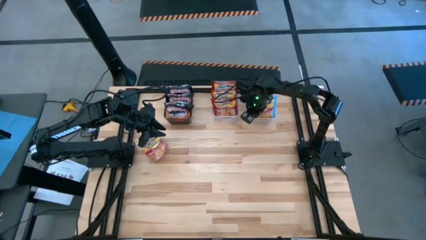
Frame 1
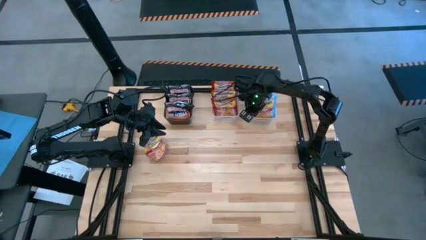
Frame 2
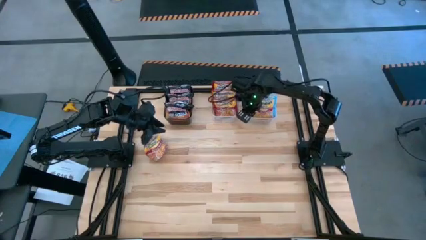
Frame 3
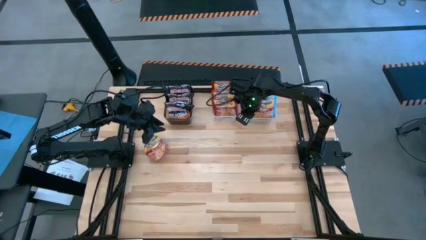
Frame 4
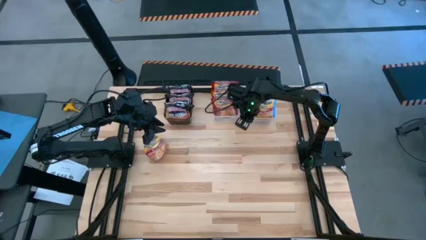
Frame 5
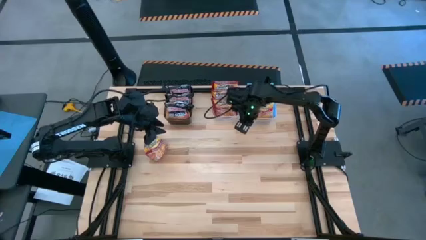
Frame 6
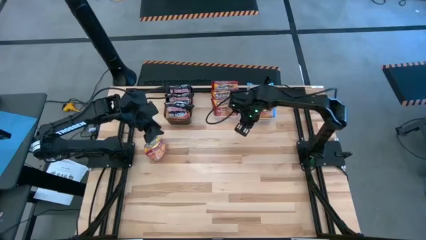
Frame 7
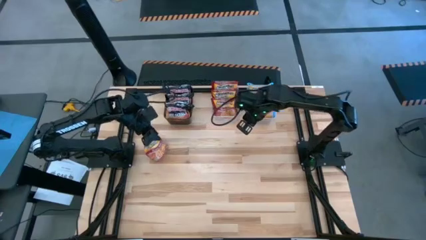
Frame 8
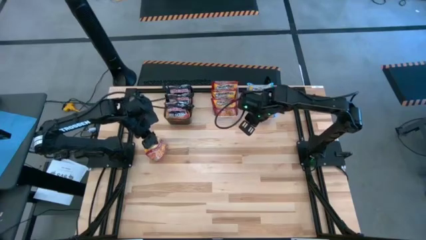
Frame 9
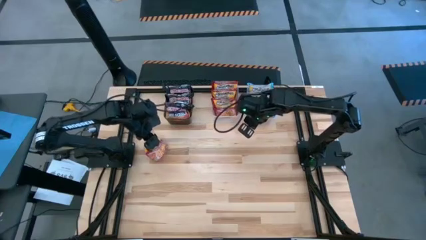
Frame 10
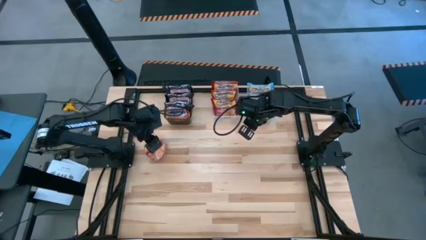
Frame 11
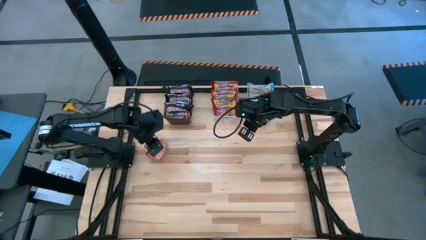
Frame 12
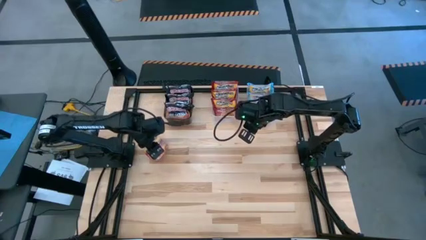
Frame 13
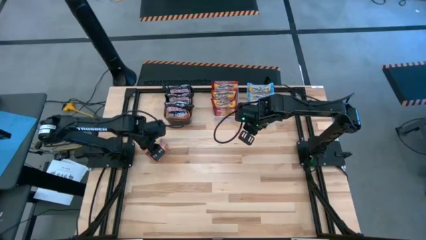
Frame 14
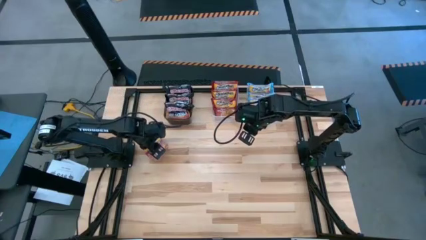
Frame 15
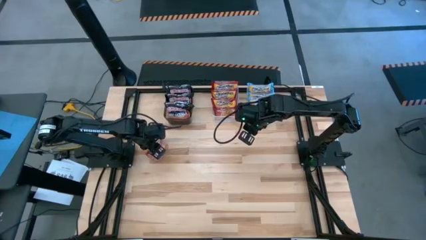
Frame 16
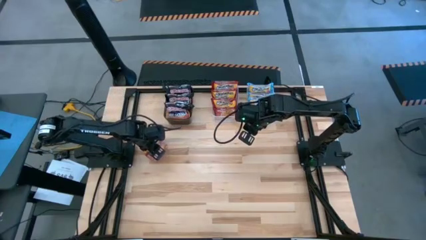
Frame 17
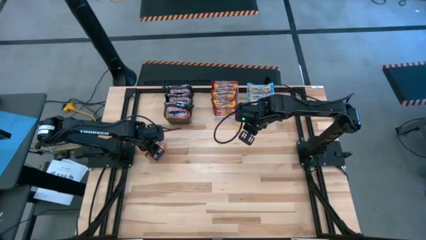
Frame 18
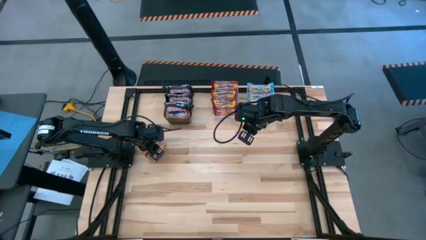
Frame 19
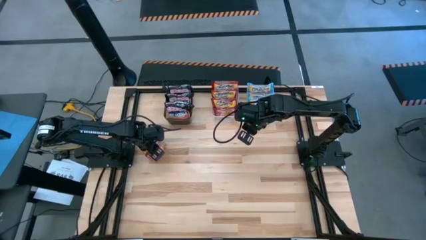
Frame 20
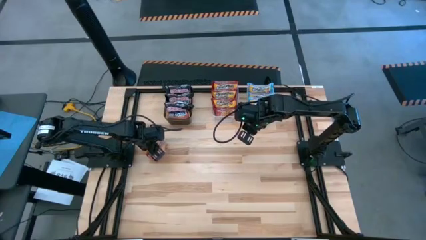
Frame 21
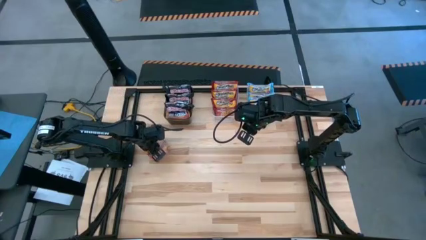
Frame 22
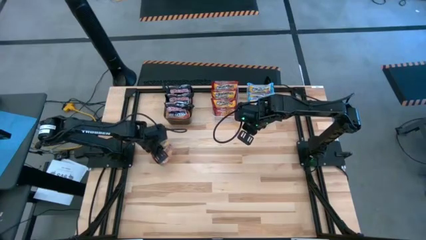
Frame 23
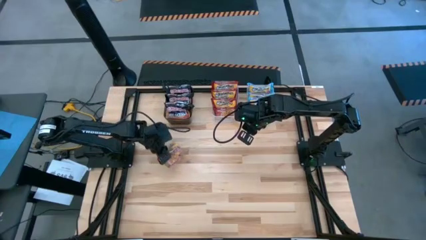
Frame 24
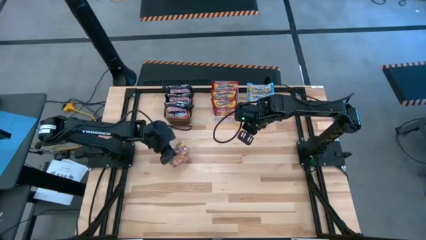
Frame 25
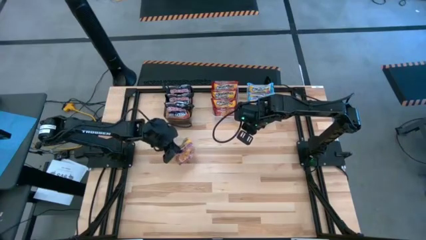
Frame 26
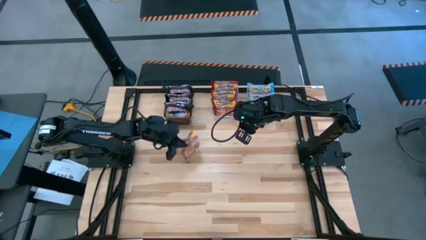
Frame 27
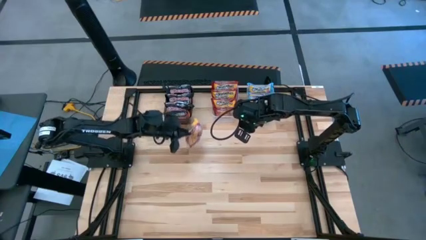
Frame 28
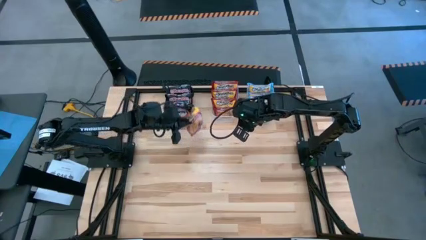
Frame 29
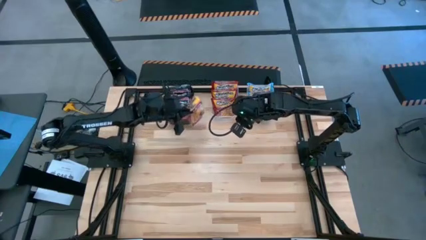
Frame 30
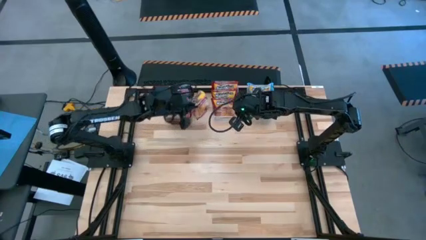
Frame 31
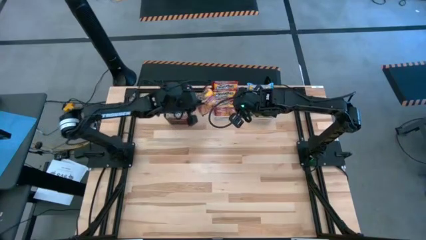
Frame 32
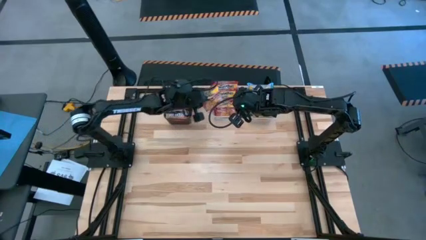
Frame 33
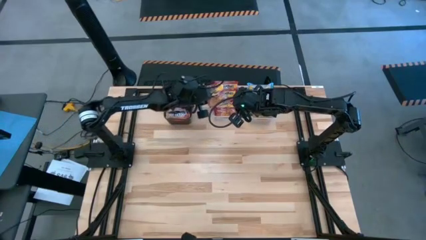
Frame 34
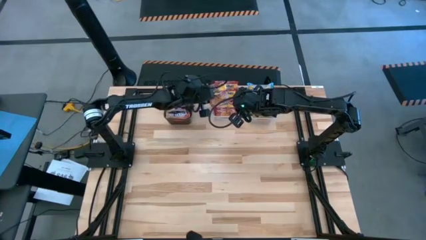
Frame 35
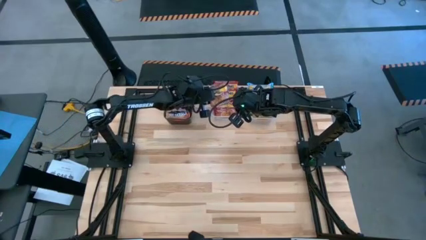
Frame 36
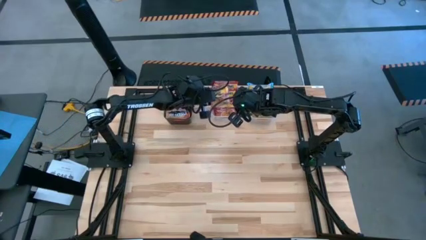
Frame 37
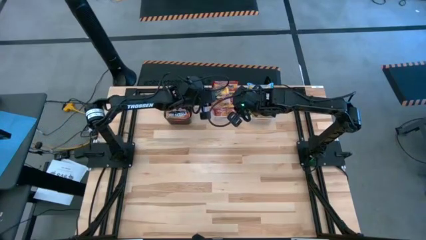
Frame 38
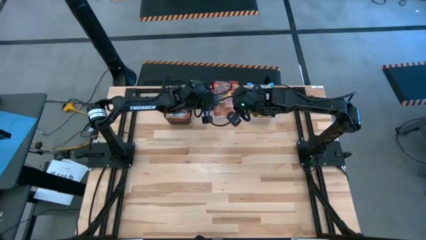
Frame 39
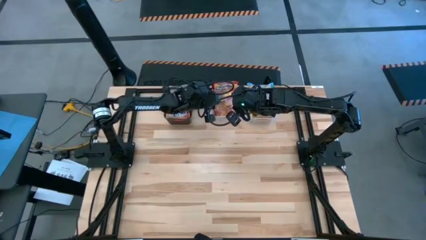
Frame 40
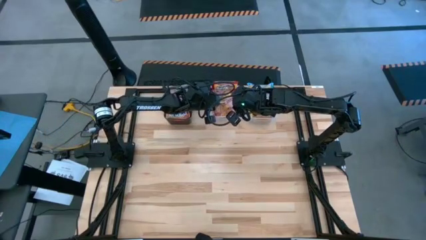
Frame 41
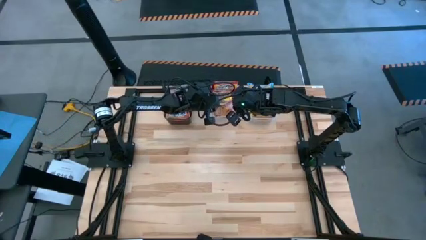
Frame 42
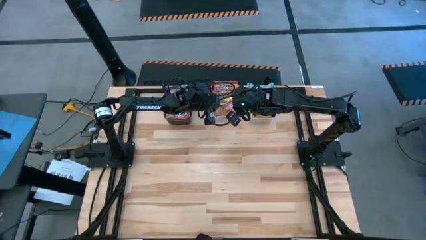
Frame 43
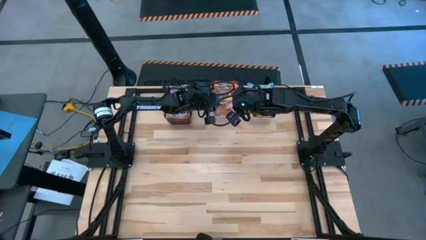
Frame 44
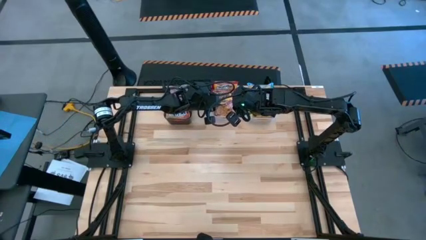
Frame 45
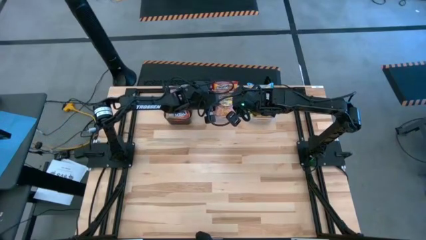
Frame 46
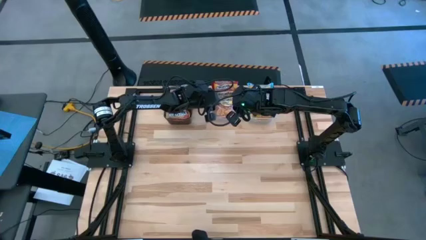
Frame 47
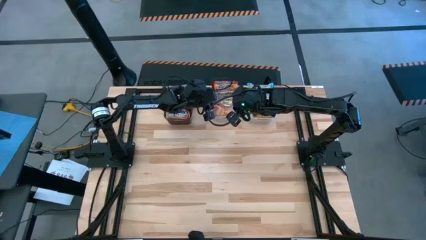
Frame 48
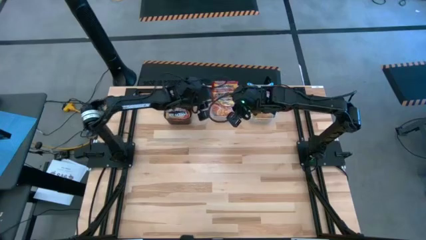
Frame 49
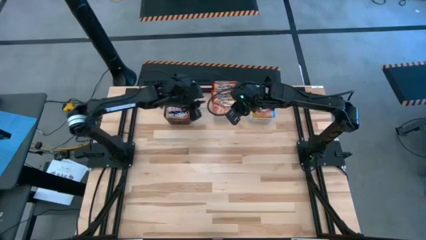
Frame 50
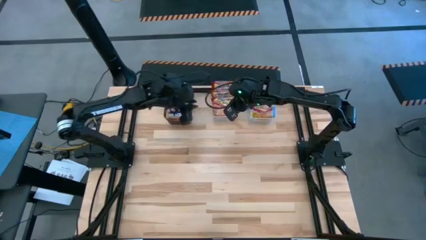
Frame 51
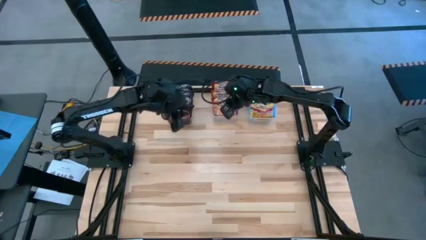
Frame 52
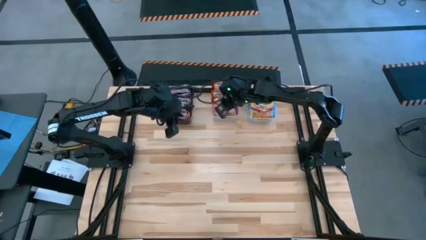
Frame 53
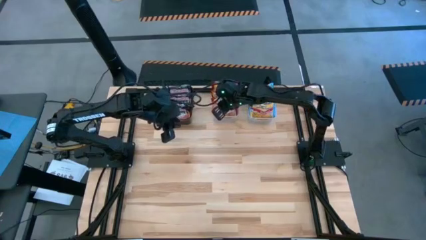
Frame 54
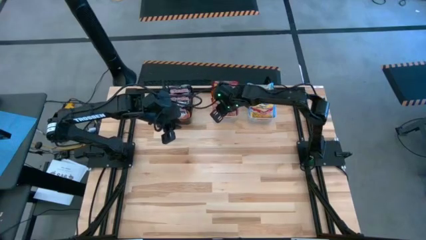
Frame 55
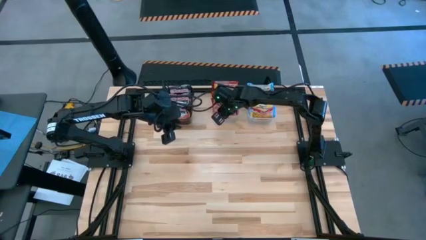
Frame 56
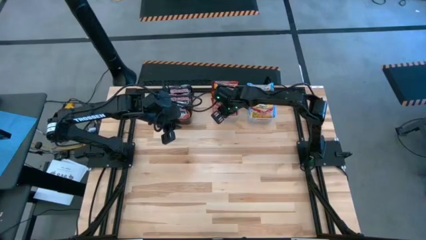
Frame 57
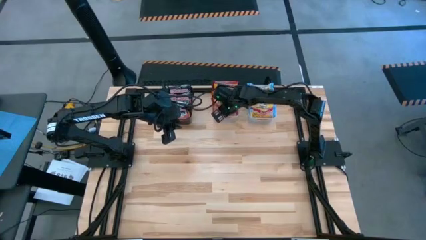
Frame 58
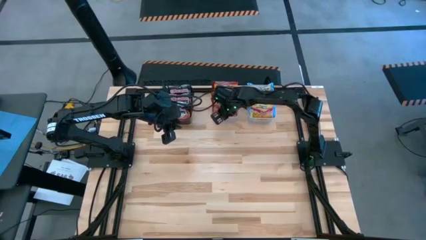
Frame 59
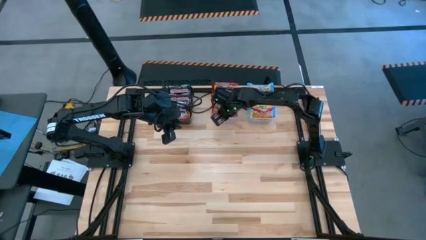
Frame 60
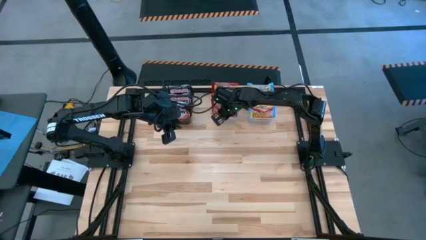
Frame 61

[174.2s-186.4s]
Task: Sort Maruchan noodles
Put the red noodle pack into the left transparent bin
